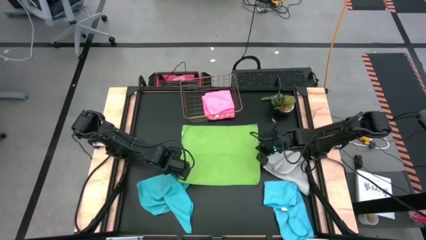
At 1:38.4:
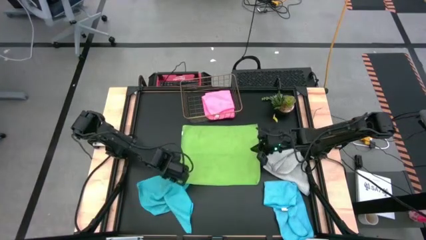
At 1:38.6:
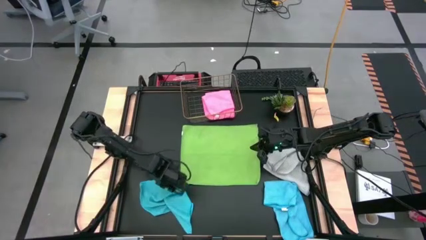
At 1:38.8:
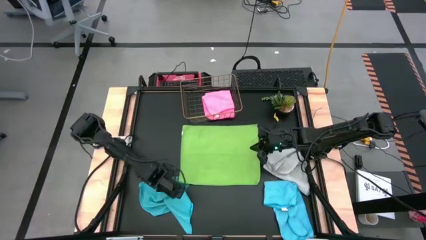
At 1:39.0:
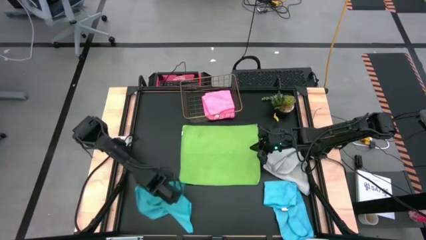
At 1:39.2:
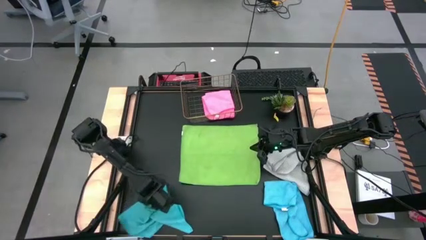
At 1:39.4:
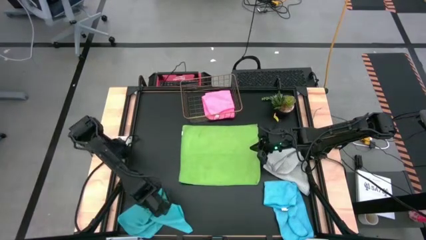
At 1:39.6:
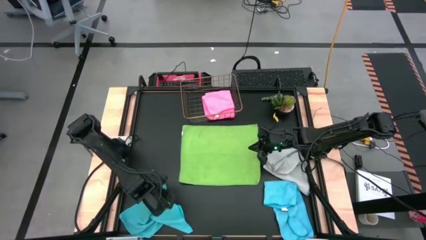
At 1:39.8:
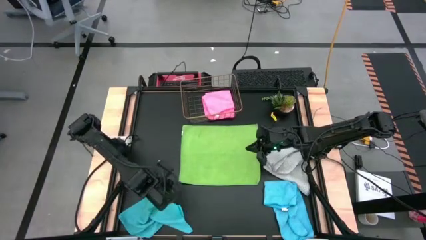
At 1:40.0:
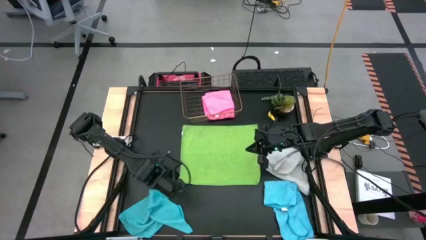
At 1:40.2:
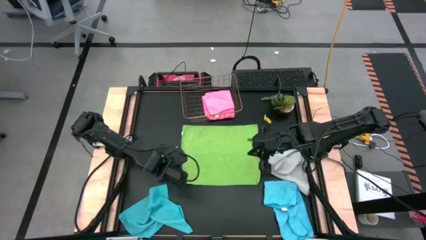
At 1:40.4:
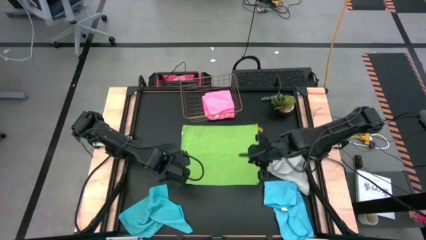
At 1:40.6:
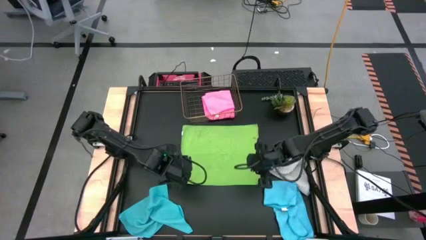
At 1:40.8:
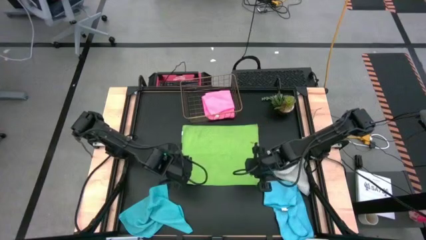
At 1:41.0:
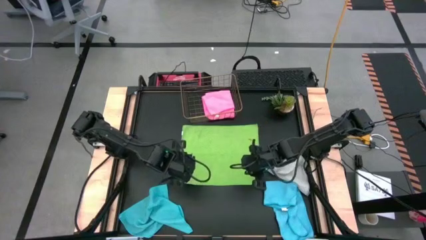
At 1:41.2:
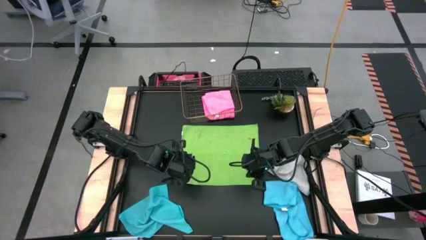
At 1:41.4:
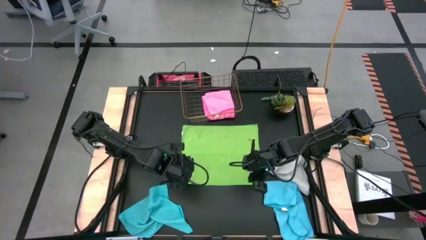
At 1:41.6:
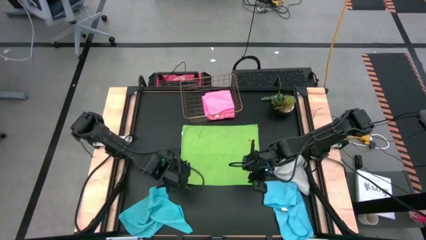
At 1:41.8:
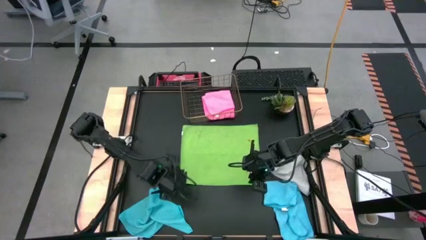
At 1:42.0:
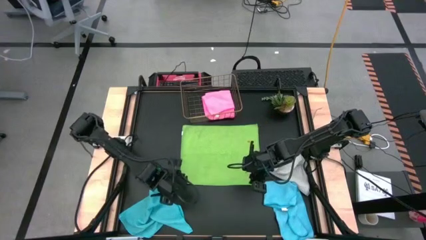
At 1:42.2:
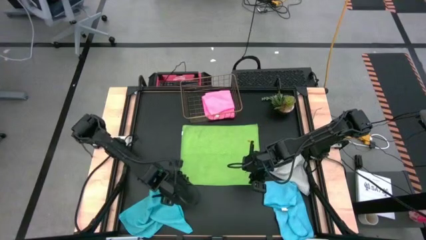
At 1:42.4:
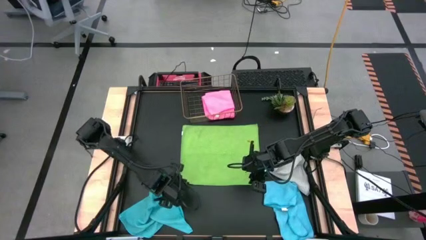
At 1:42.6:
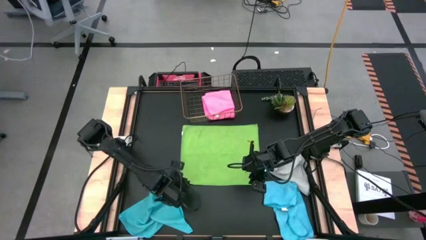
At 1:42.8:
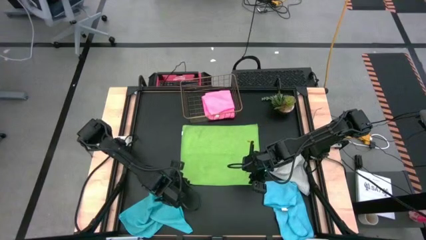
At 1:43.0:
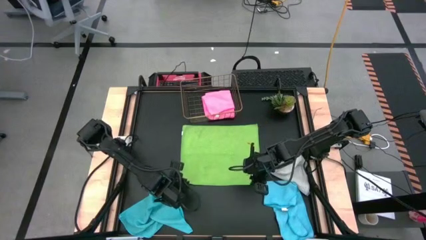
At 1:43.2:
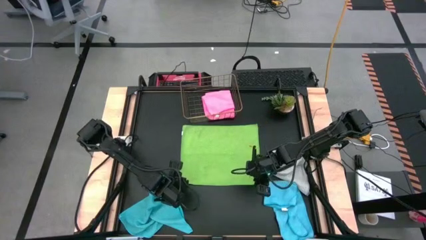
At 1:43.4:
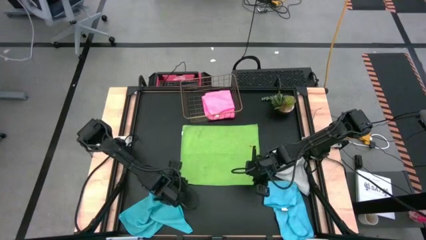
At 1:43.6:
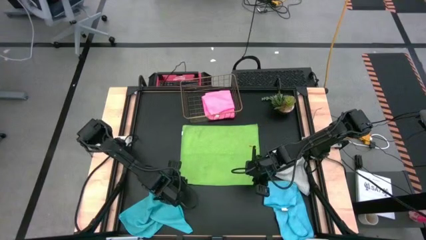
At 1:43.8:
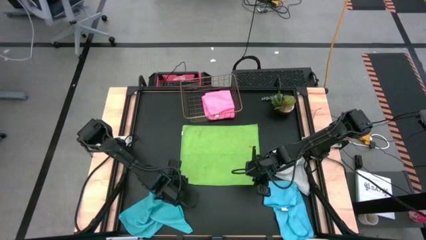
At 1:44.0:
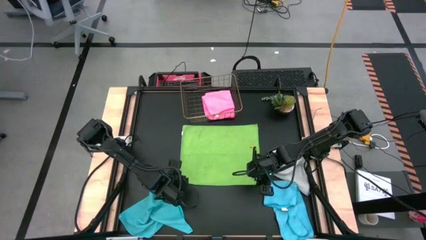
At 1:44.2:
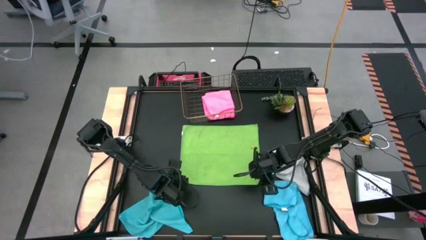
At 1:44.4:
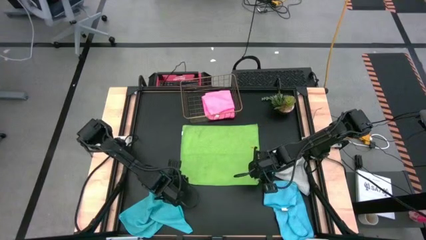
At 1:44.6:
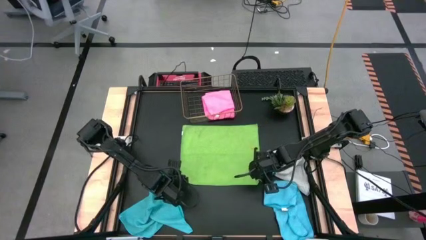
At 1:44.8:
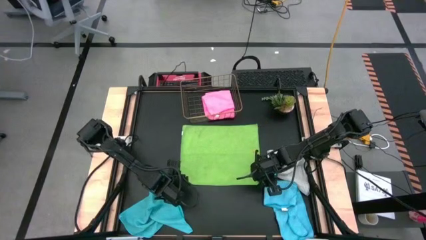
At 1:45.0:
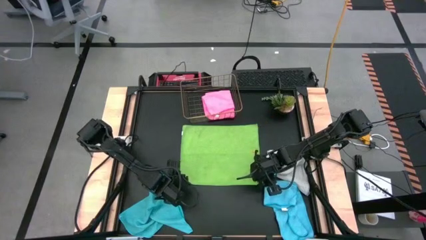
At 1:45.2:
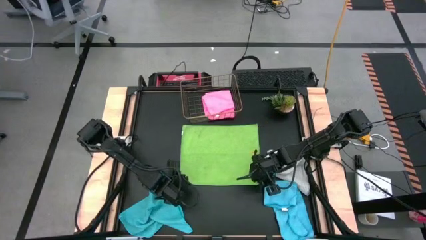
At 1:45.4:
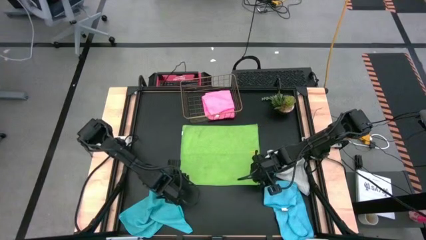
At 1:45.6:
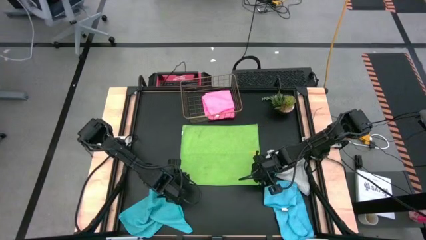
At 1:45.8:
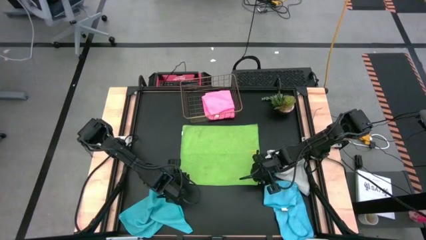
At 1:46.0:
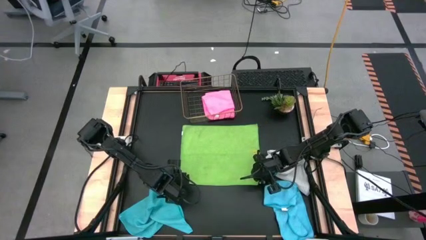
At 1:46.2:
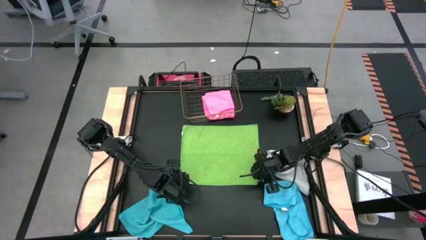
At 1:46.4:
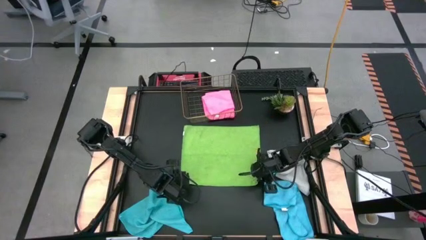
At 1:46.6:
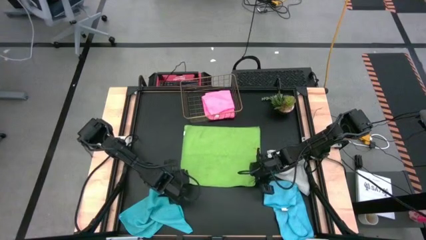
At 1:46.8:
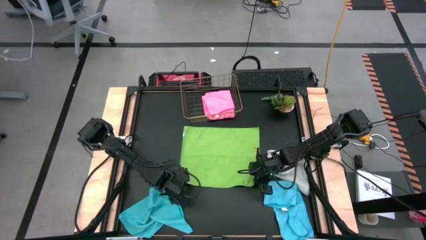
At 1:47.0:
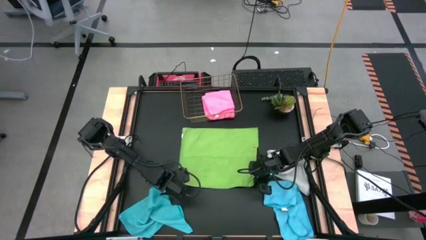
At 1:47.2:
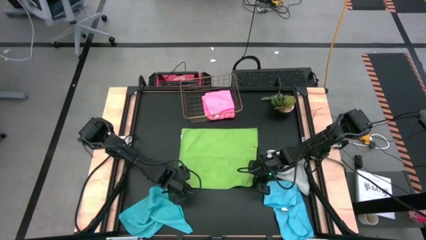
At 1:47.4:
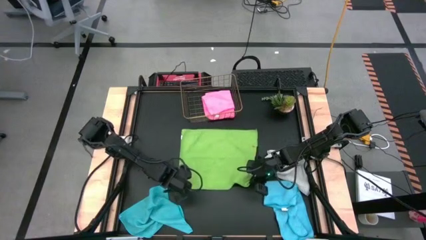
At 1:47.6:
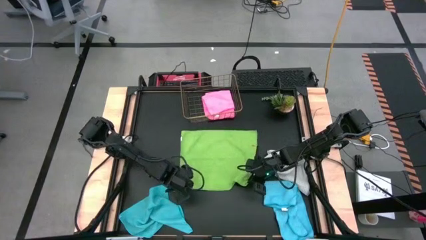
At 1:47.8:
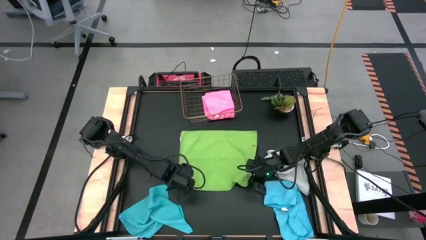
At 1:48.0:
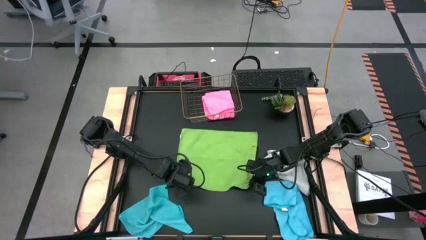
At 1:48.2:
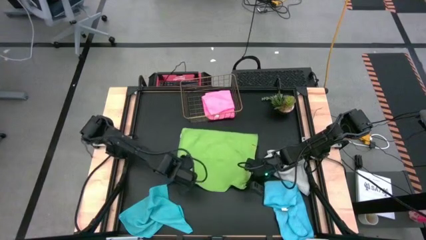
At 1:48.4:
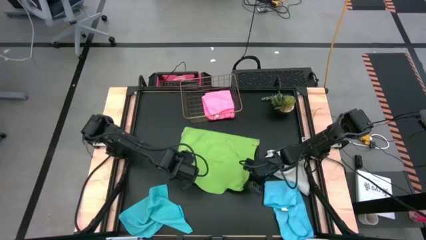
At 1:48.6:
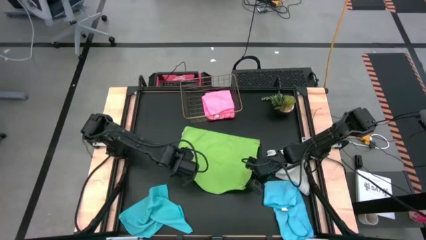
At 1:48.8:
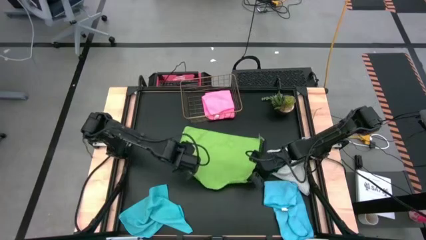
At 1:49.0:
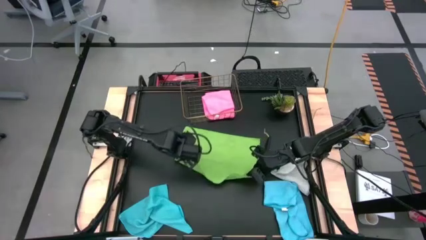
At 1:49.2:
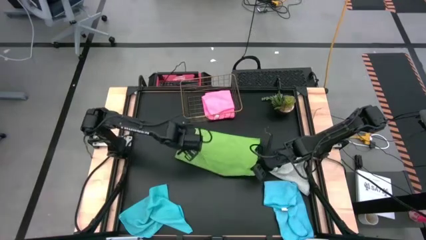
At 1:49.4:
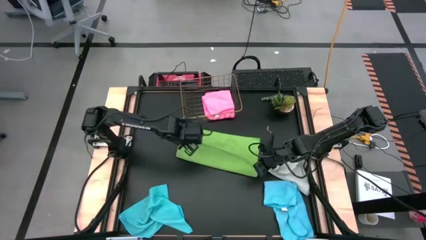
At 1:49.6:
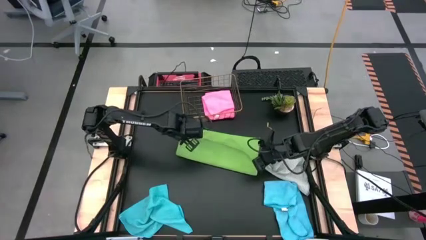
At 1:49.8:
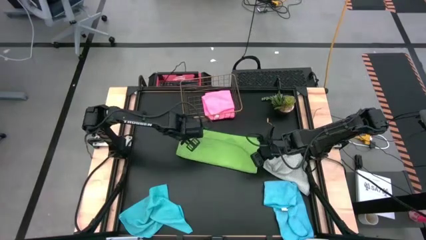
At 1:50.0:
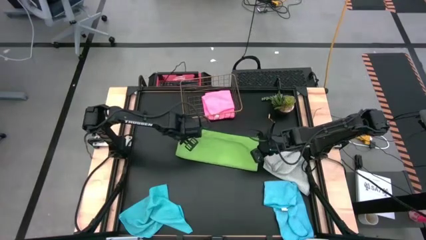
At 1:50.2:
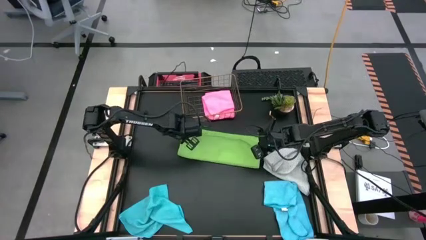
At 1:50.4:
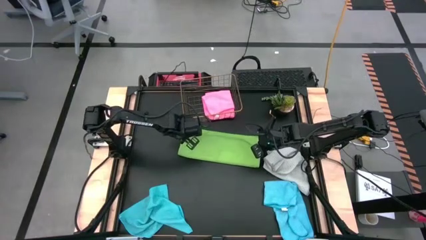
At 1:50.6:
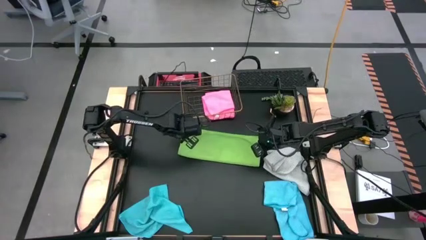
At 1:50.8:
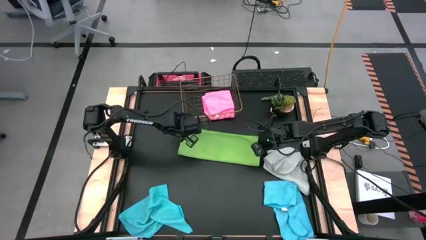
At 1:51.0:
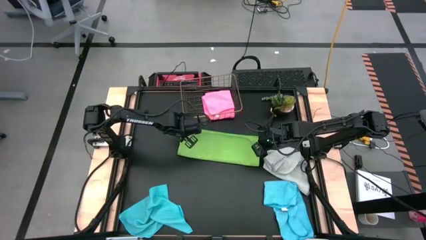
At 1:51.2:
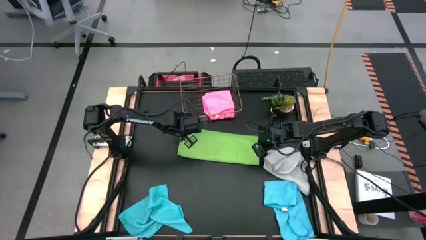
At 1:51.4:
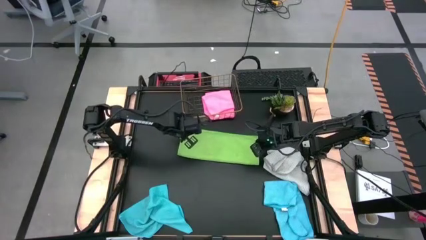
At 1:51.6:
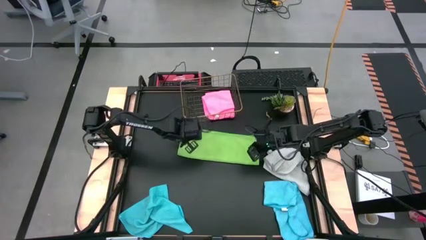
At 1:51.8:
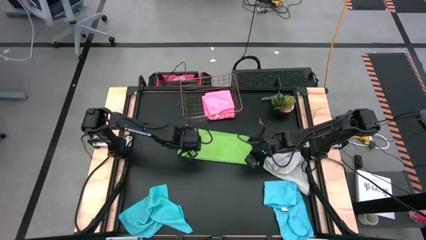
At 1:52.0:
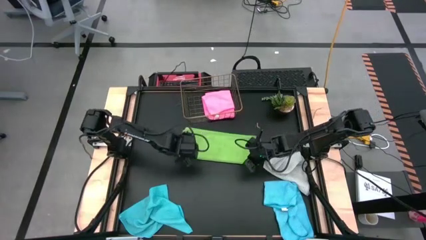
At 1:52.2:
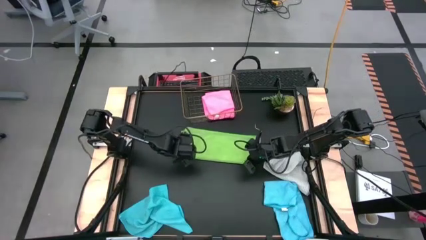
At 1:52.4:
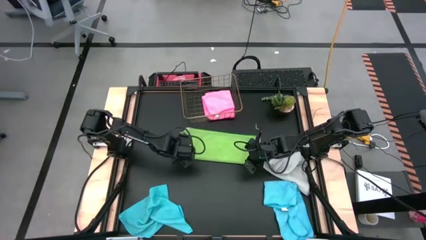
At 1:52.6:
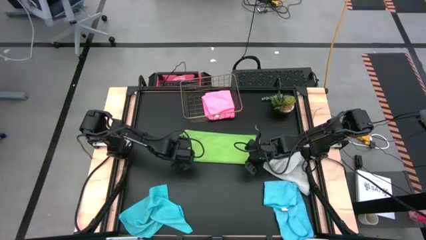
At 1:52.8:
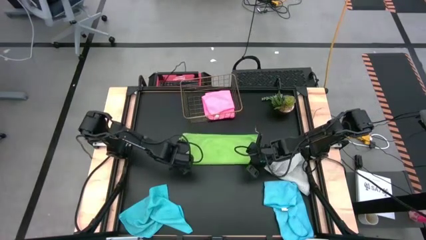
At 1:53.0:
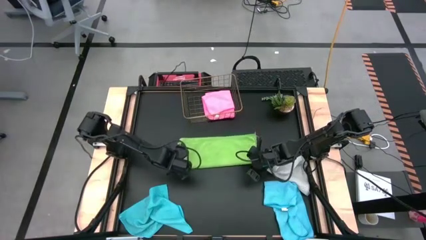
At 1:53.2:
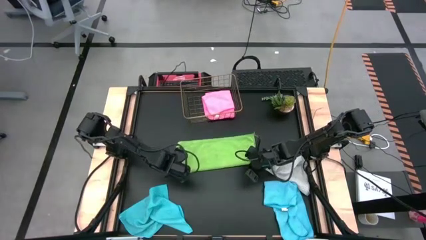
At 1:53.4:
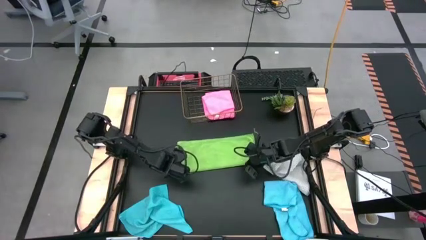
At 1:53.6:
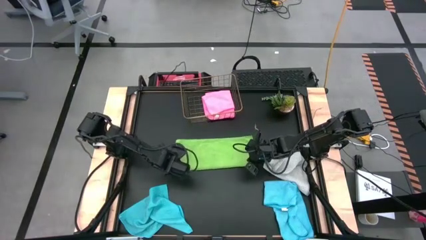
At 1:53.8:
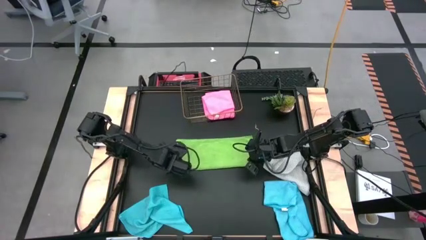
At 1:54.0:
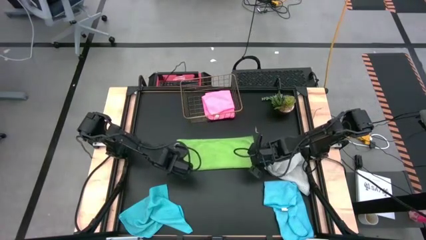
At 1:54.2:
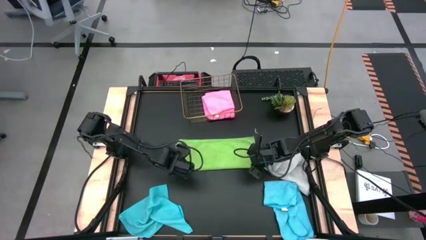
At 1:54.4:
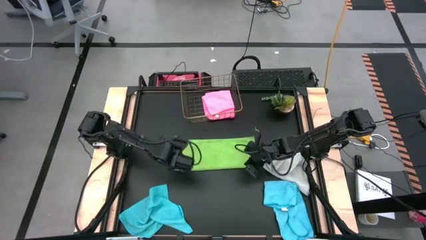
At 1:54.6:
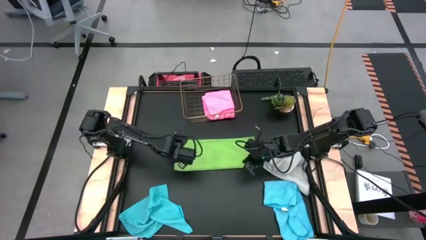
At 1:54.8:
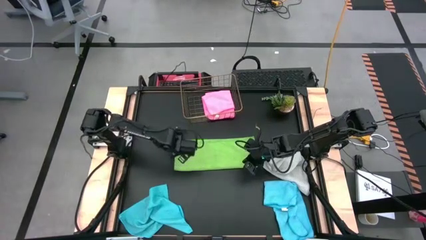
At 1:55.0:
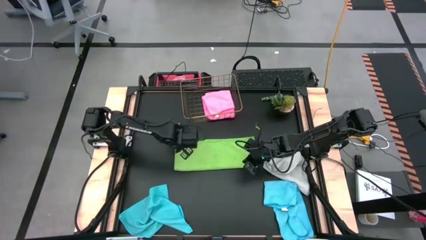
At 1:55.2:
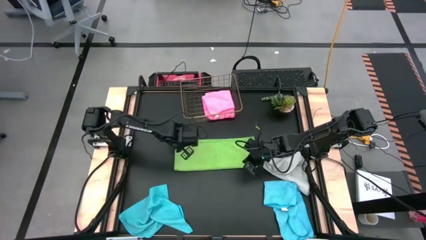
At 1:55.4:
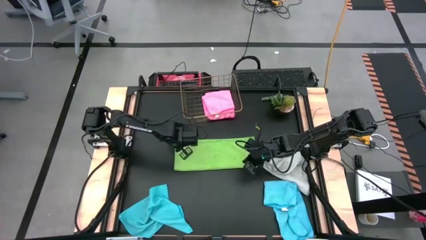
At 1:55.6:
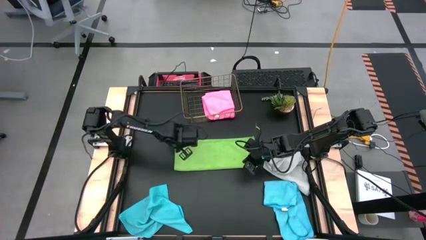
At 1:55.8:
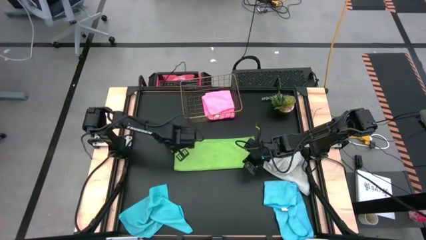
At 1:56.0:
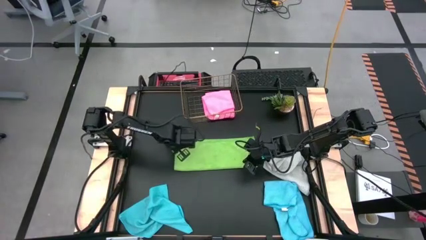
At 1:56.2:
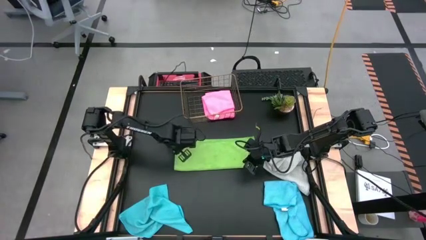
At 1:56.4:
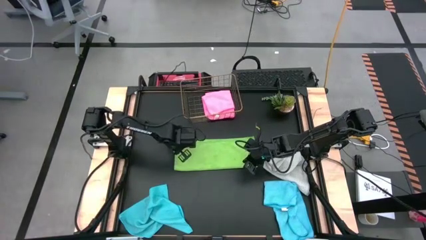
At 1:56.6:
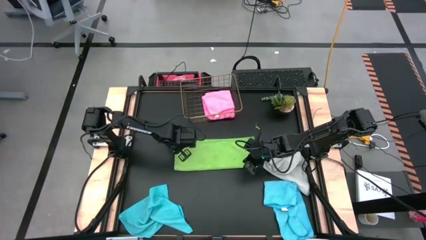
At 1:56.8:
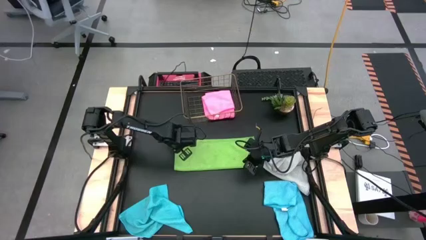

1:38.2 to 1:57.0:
Task: Fold microfiber towels
Fold the green microfiber cloth in quarters
